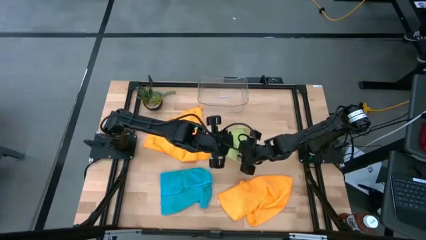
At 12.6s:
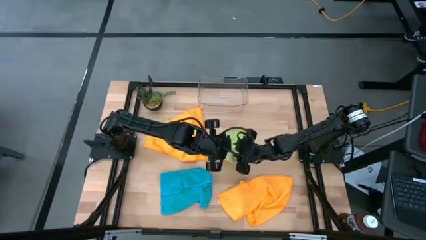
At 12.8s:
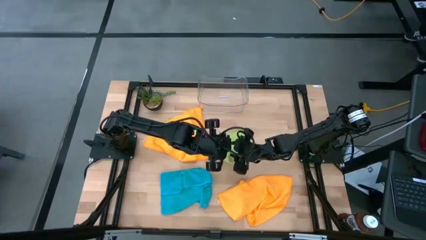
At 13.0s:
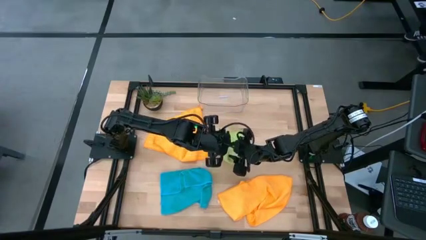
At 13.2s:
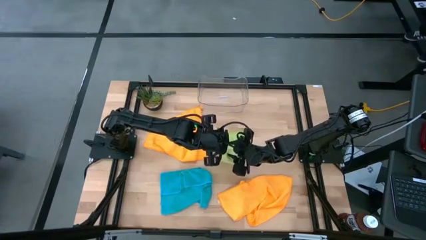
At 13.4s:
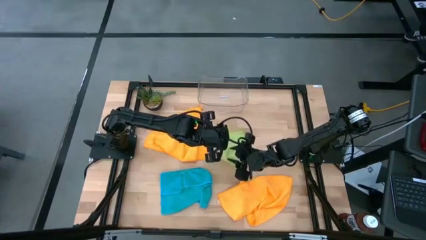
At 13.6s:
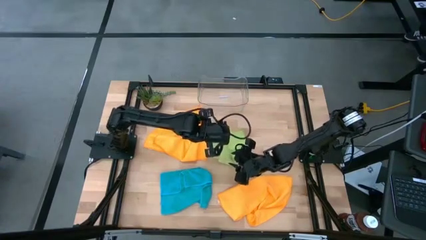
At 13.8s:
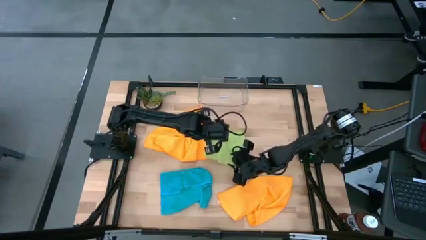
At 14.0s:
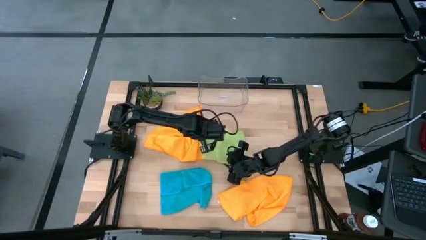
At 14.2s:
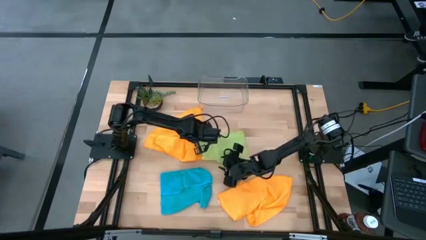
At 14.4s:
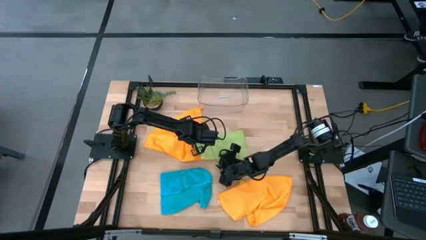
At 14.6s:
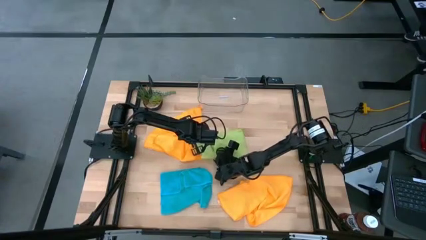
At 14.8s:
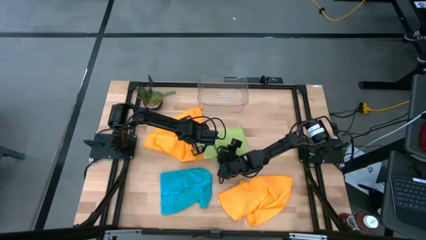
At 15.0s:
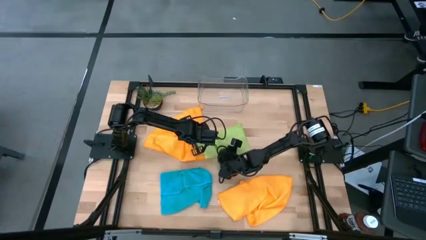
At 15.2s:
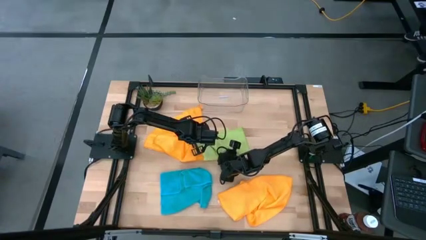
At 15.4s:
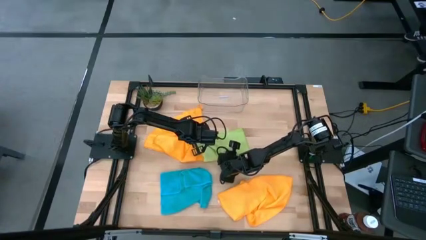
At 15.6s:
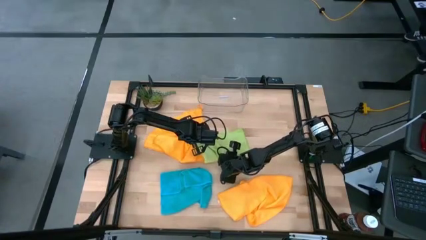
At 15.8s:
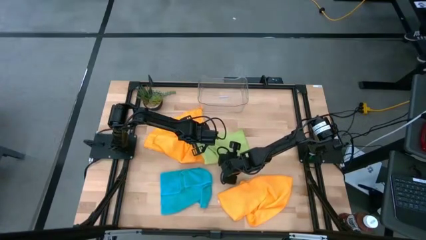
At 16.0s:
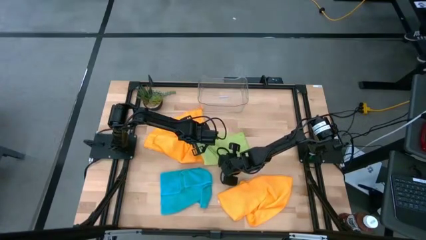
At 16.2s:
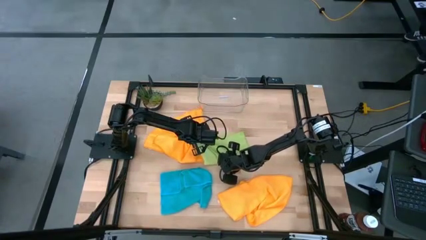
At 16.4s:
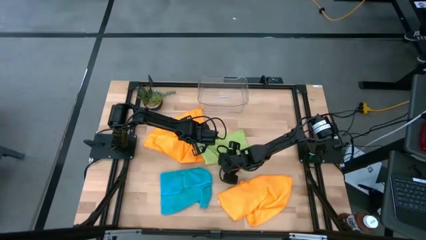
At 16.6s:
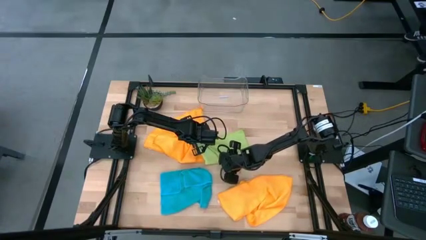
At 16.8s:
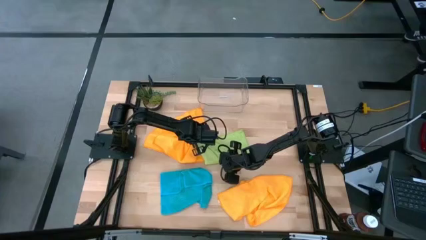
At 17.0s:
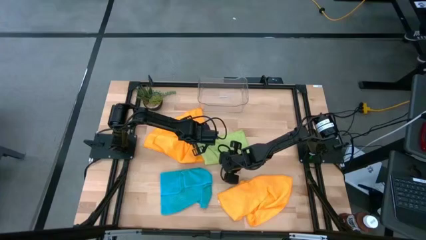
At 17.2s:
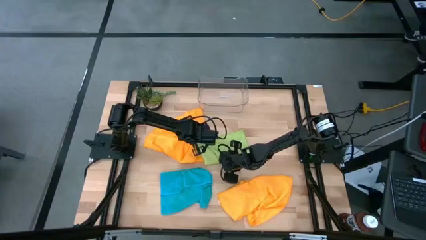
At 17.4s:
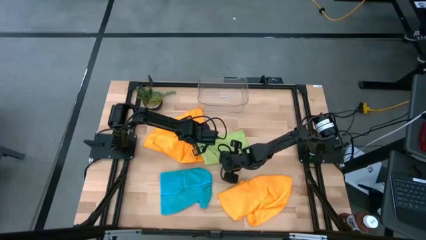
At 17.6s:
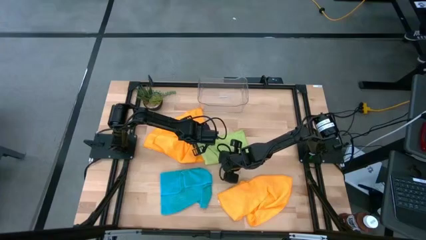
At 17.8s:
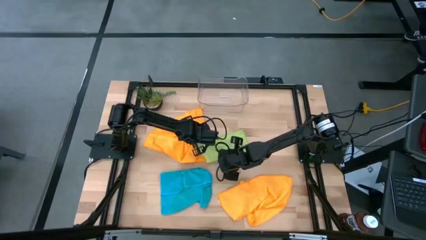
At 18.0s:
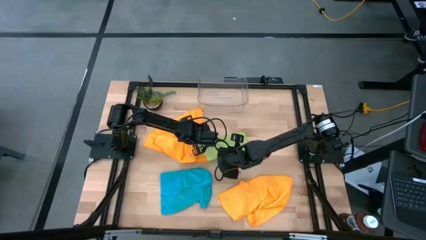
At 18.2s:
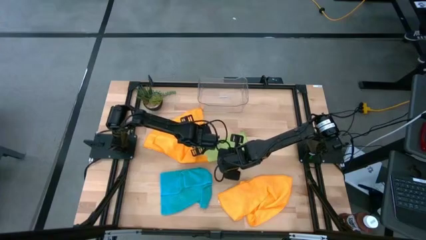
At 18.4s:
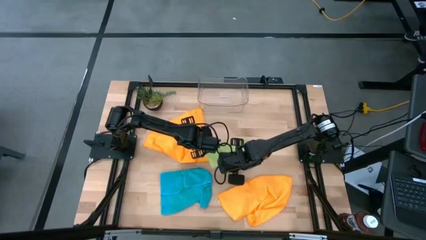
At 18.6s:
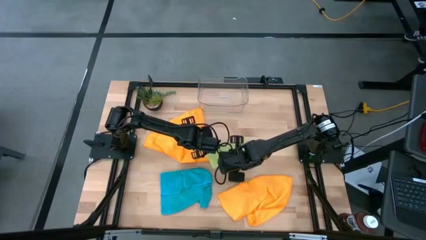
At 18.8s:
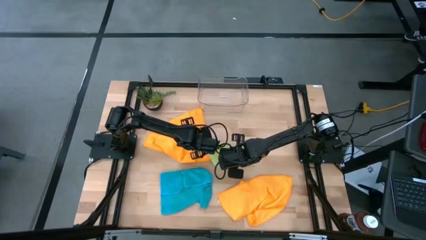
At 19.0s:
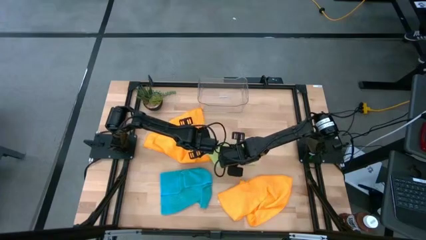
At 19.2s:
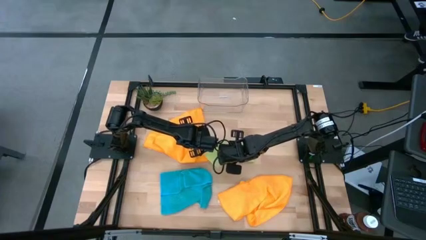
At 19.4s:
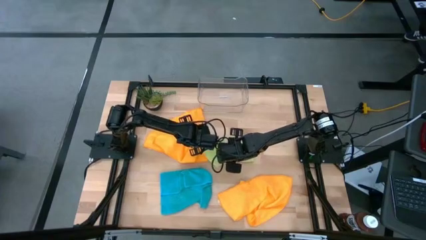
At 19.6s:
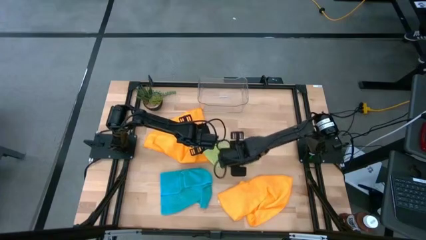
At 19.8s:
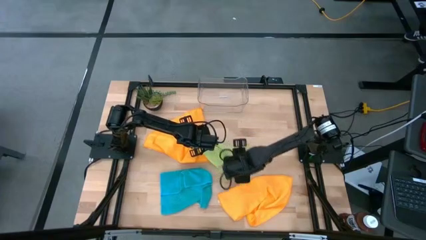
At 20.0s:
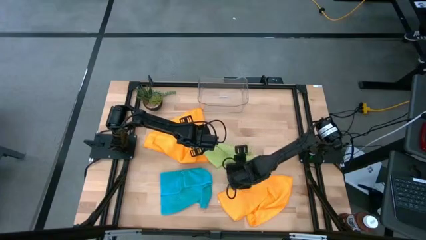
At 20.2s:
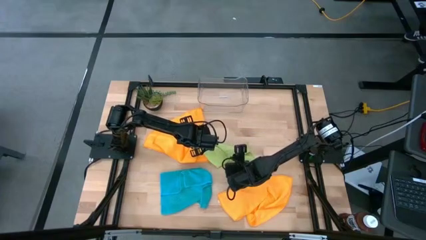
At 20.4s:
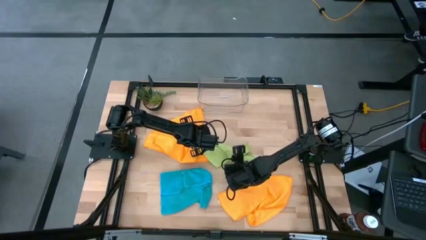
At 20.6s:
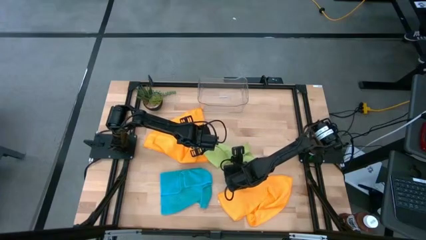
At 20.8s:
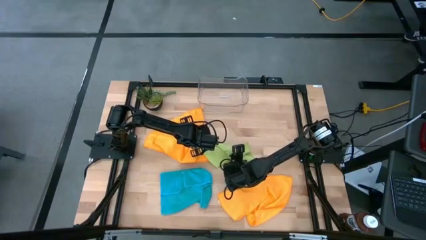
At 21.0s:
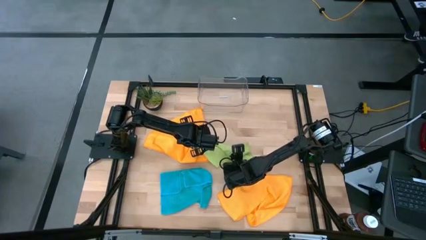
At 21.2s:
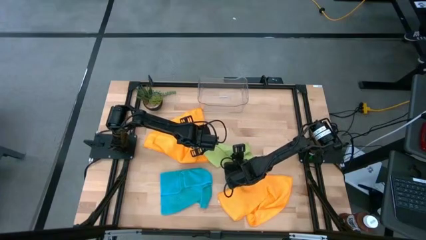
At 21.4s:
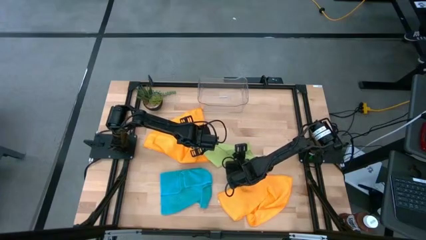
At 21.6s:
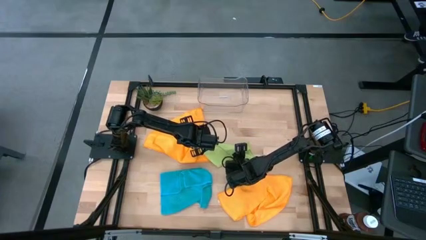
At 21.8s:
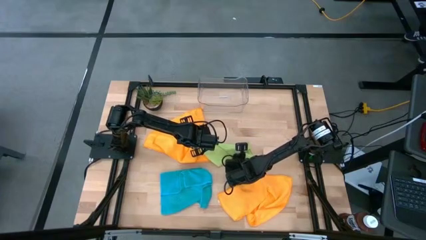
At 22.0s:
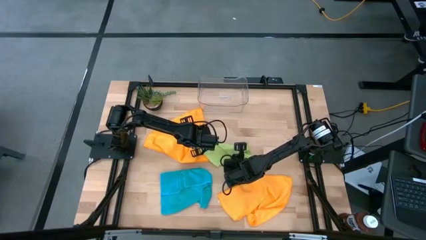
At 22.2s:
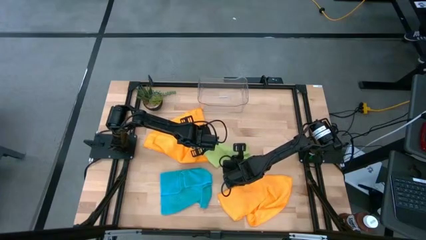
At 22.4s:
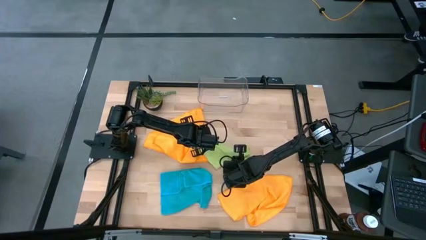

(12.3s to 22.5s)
Task: Fold microfiber towels
Fold the green microfiber cloth
